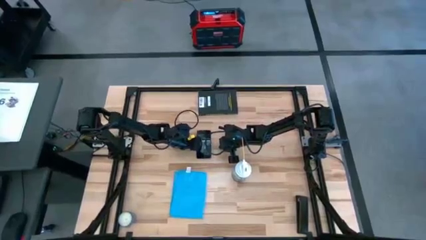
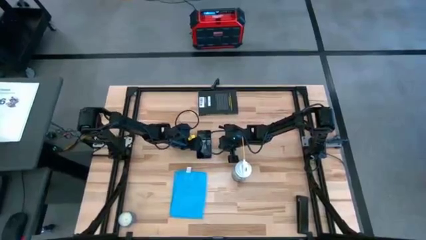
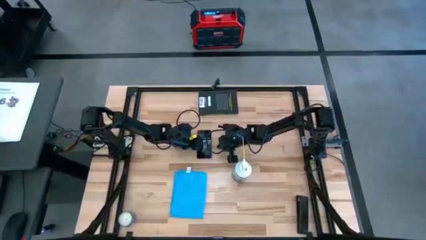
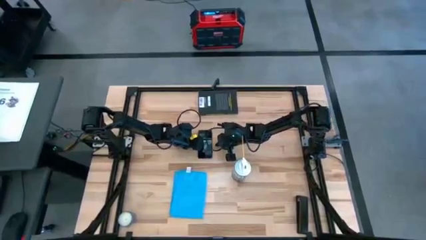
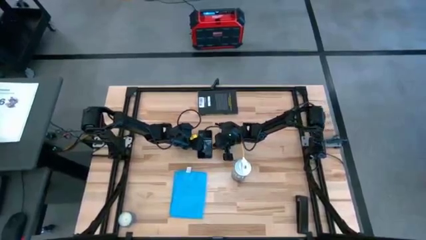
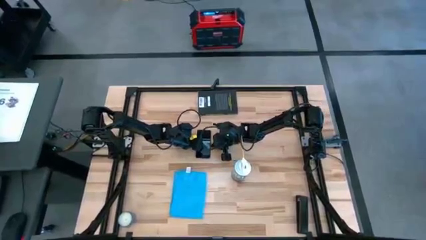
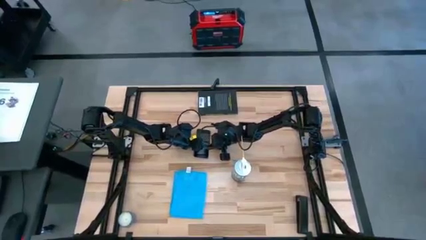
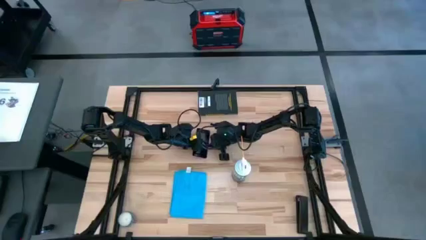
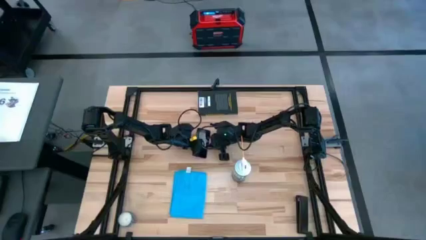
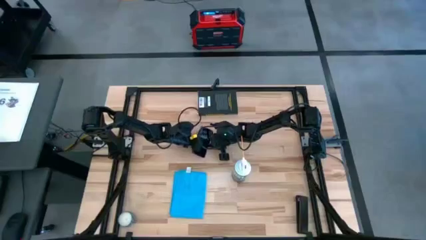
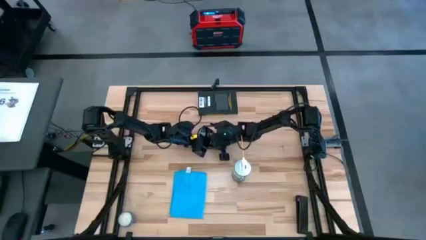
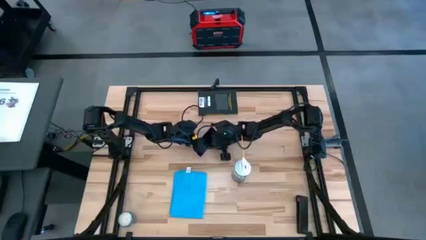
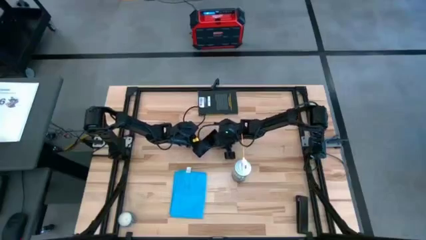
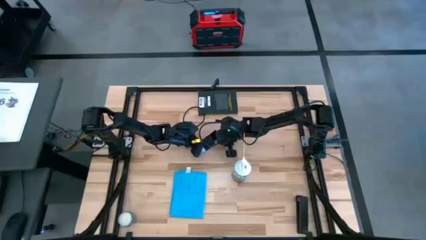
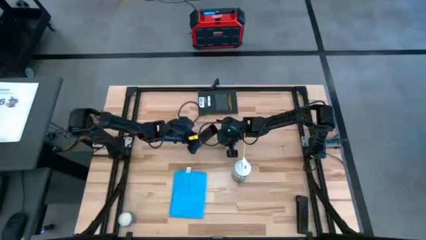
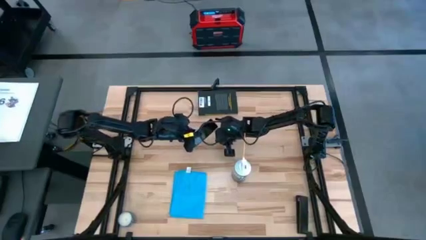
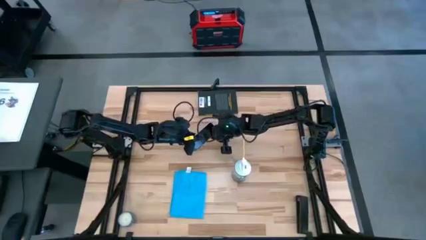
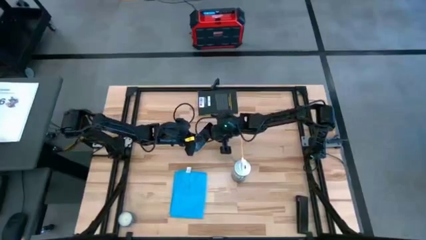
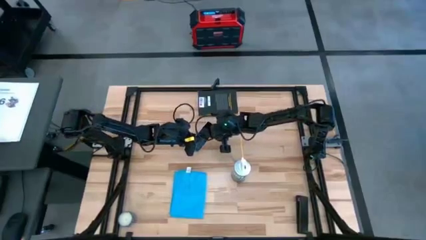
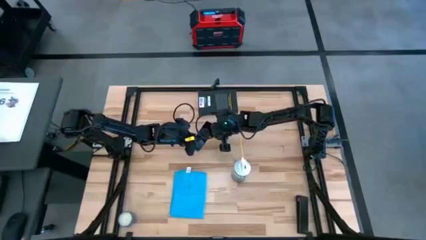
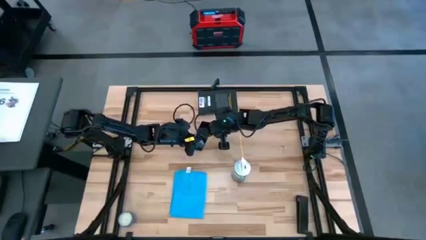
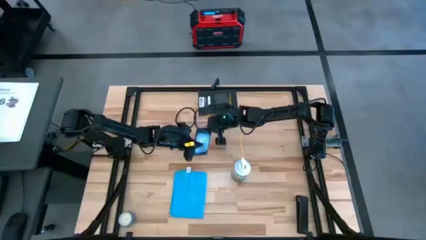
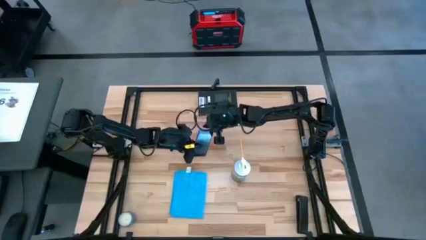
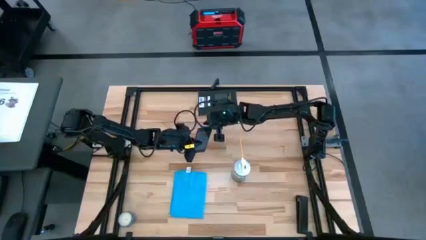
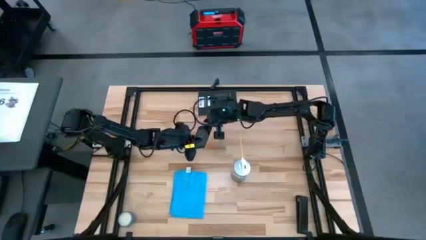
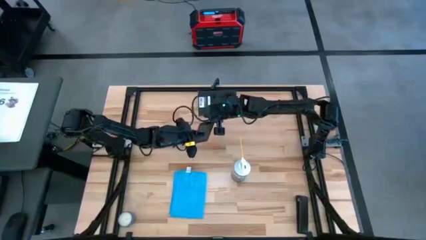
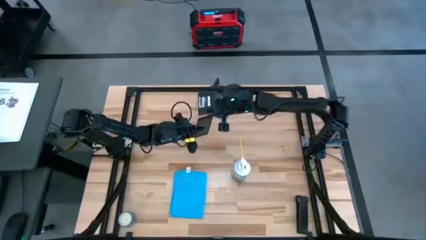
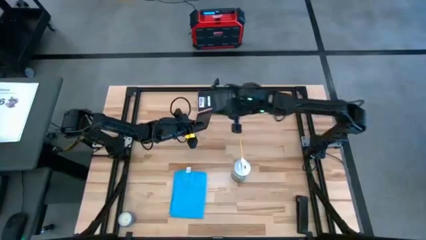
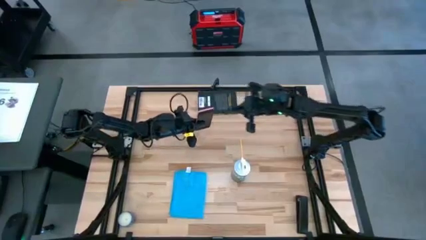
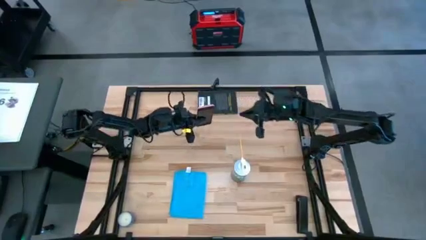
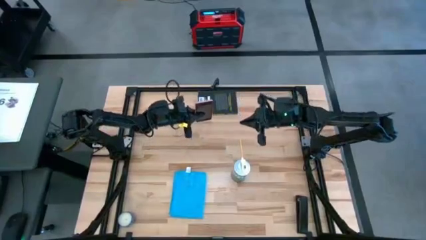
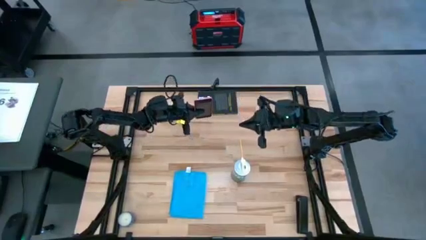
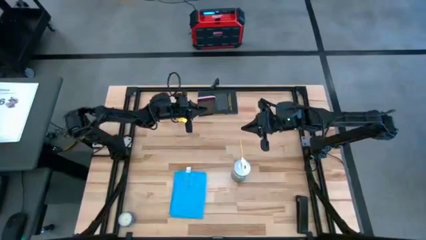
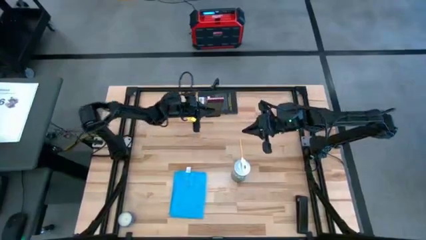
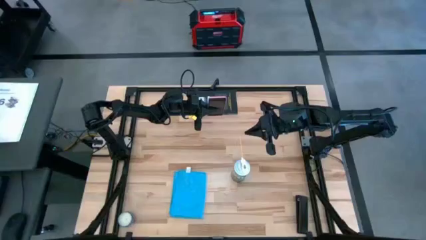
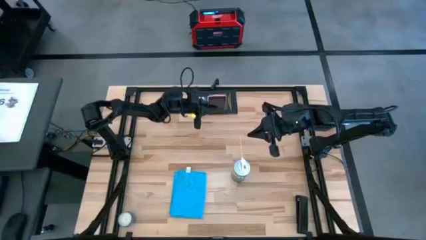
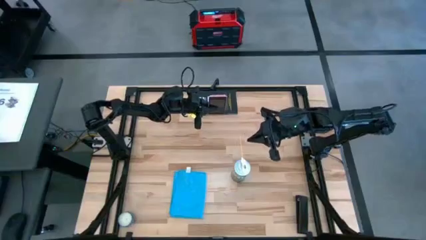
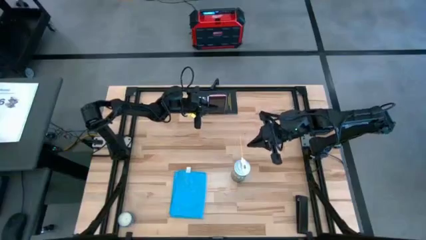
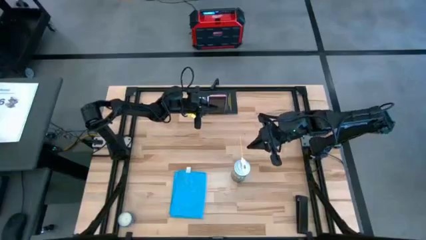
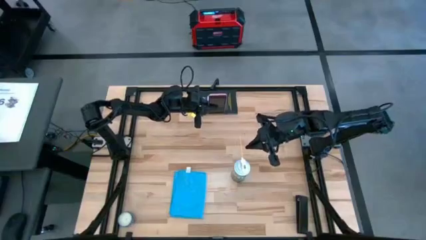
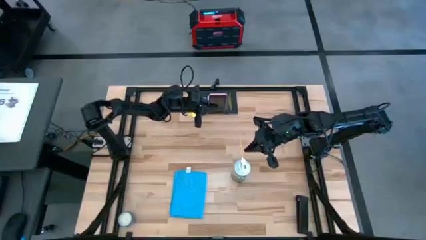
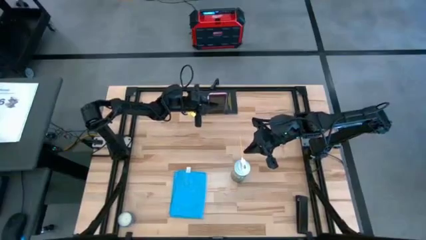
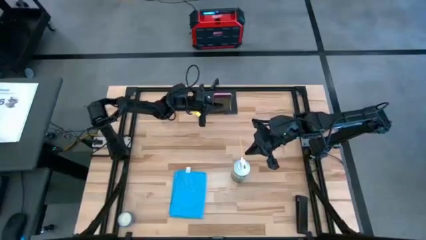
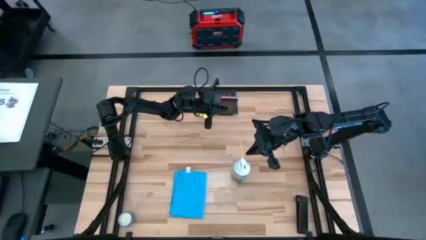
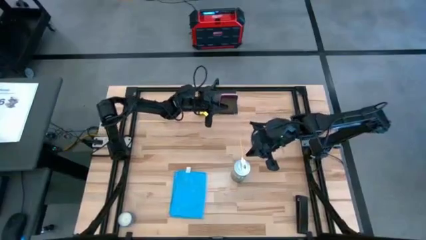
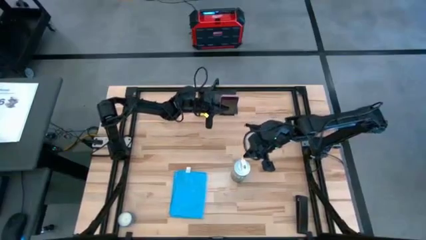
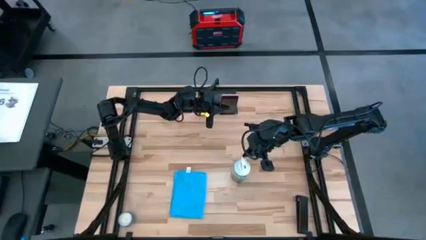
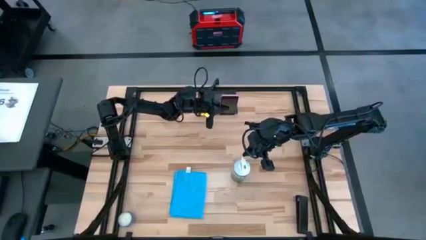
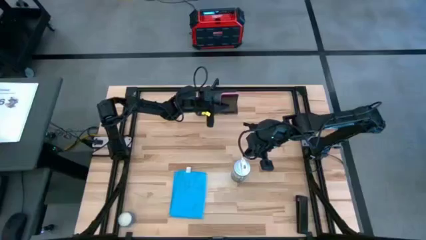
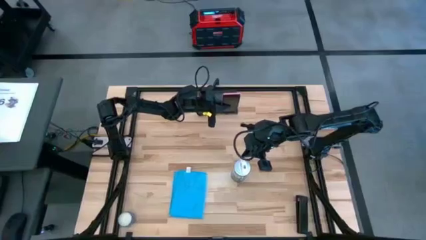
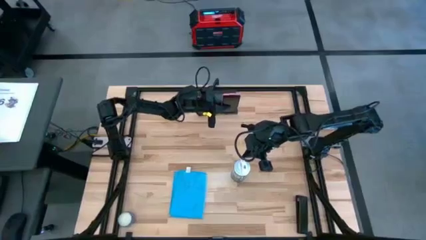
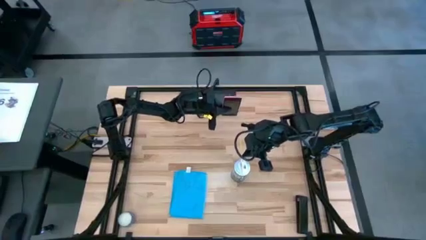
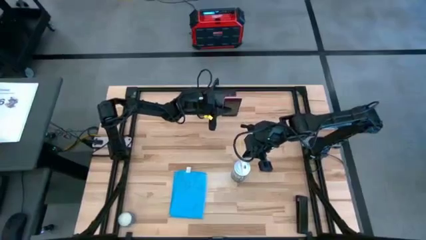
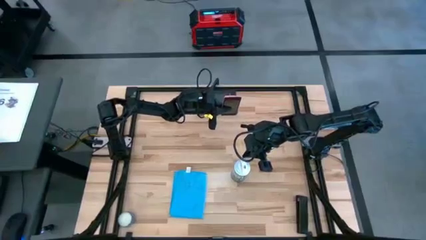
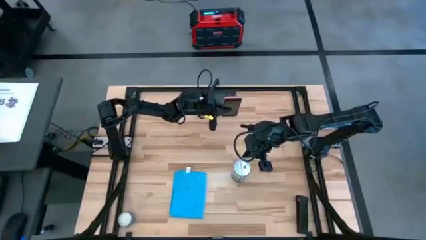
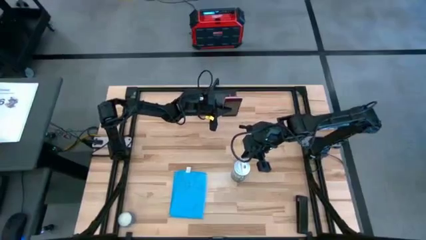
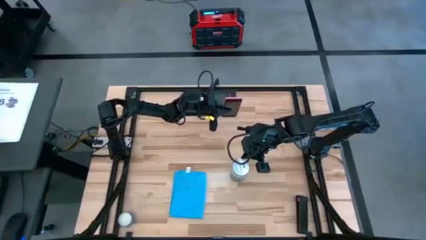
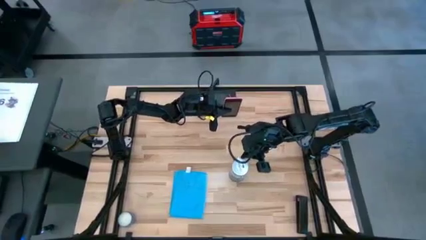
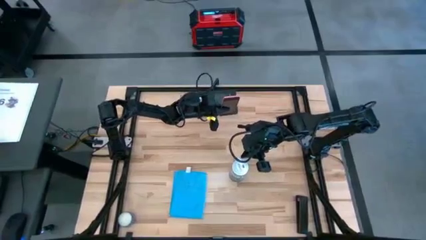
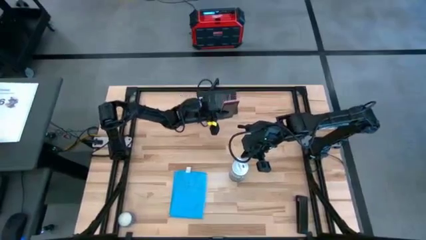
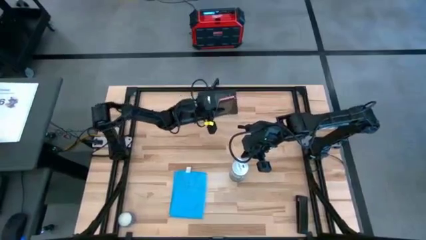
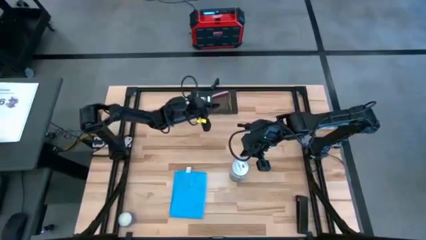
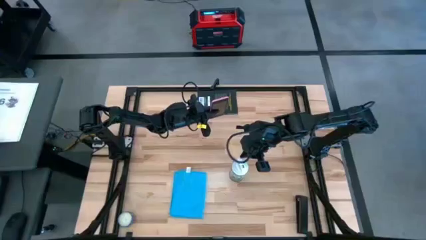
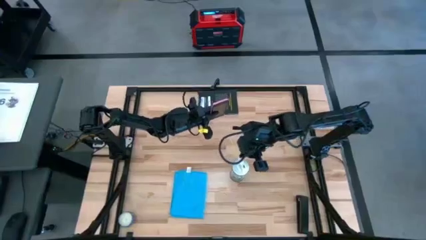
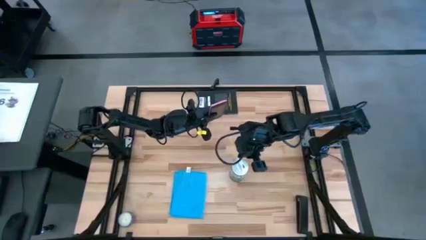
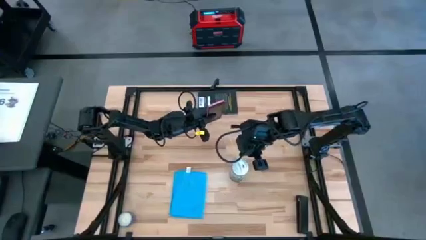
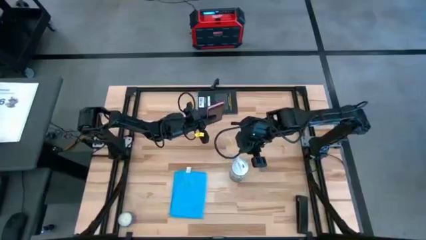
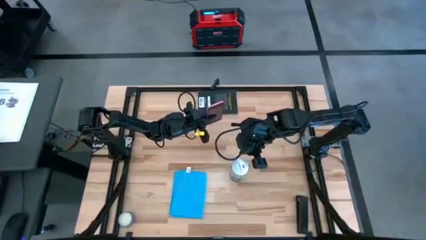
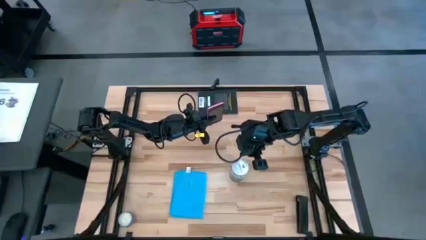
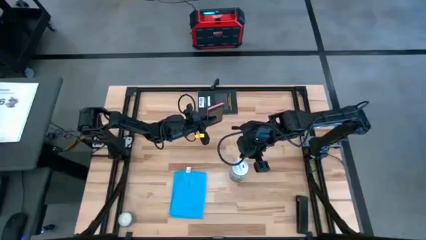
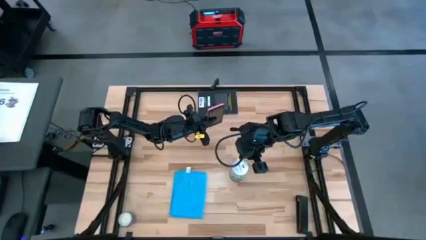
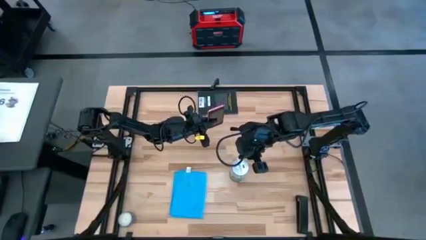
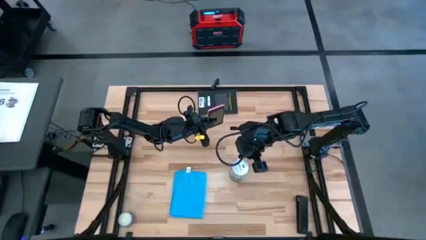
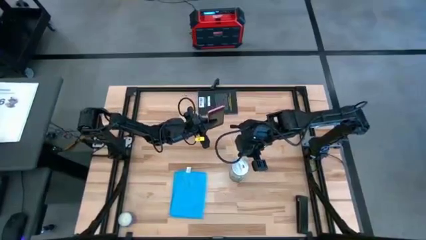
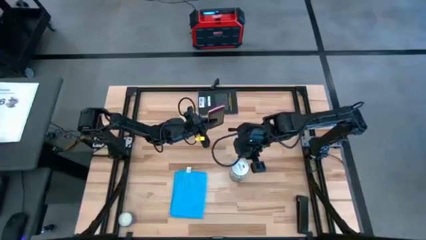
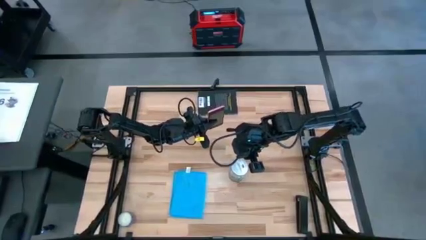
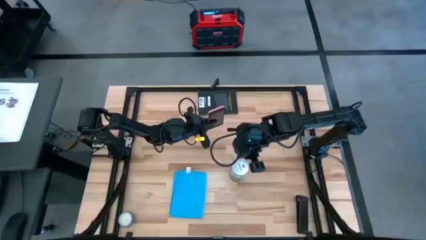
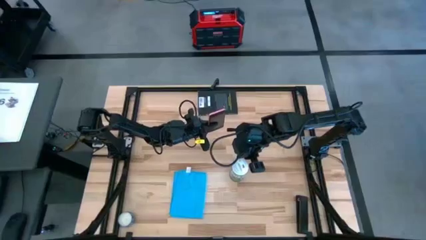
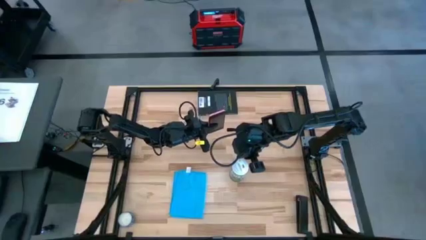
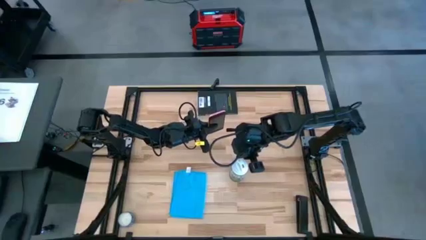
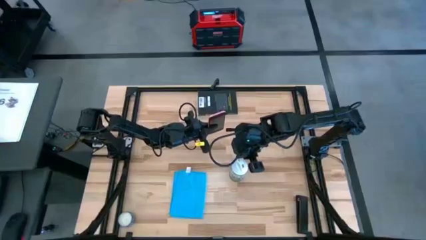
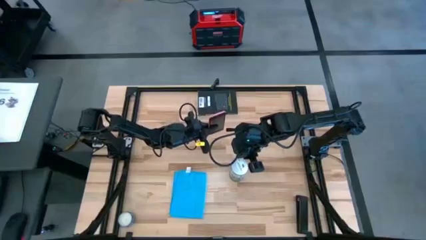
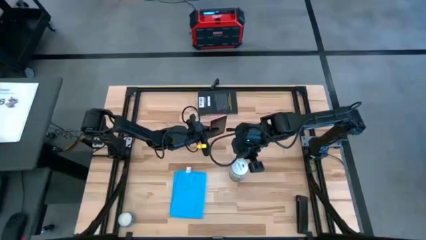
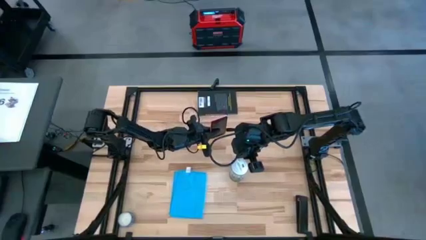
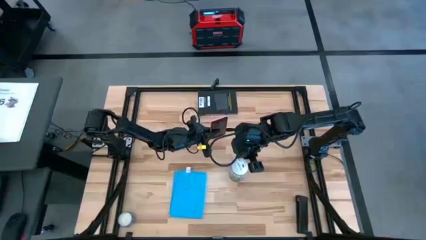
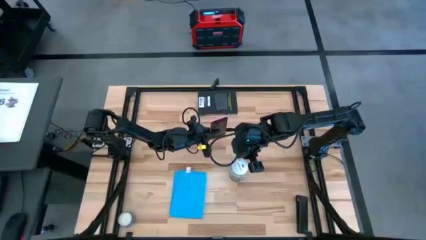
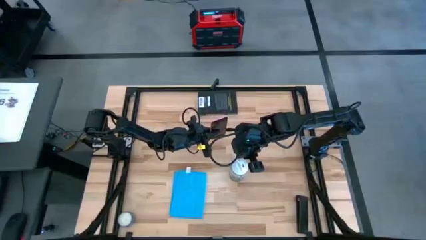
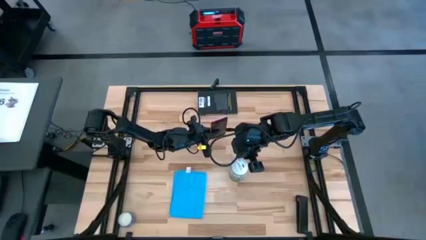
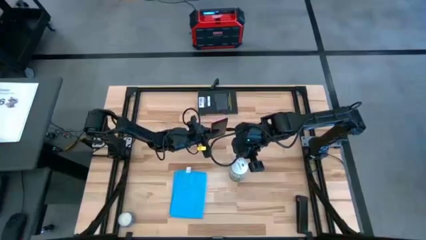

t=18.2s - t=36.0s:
Task: Apply microfiber cloth
Spray the front of the cellphone with the spray bottle
